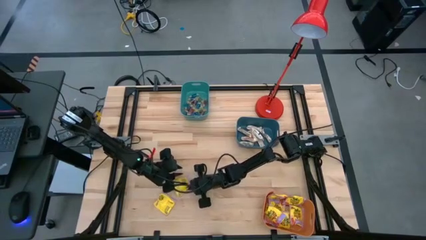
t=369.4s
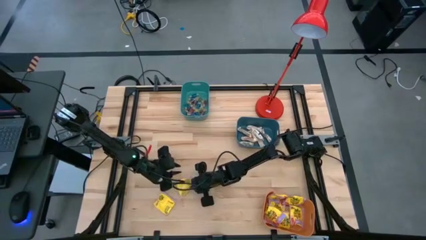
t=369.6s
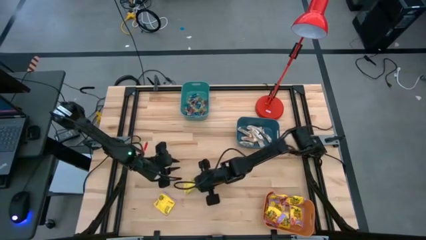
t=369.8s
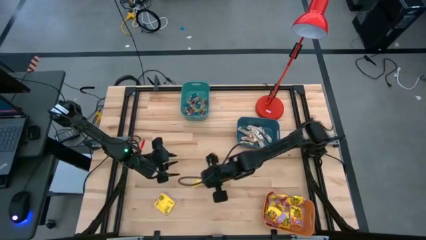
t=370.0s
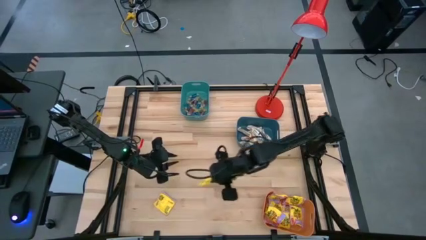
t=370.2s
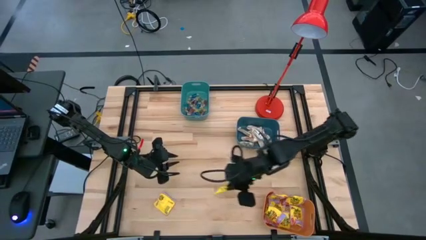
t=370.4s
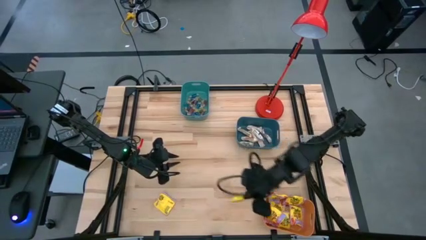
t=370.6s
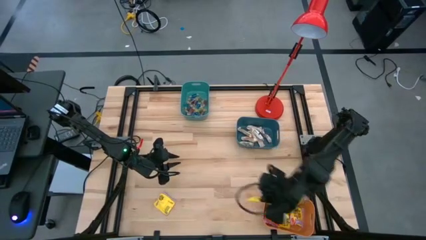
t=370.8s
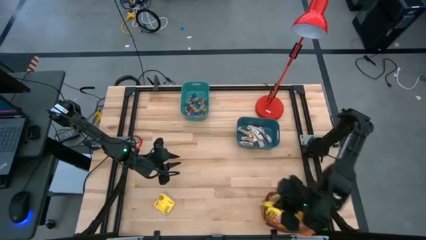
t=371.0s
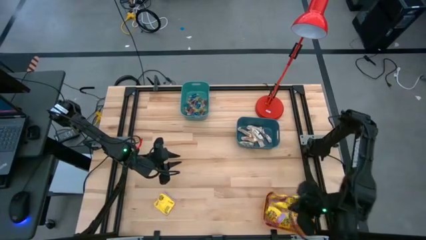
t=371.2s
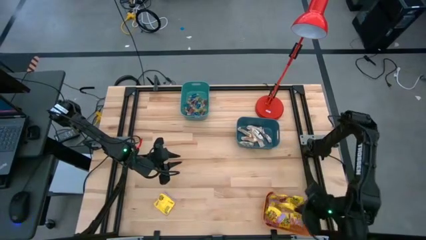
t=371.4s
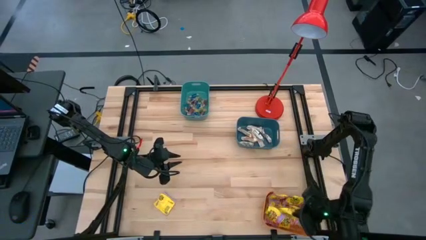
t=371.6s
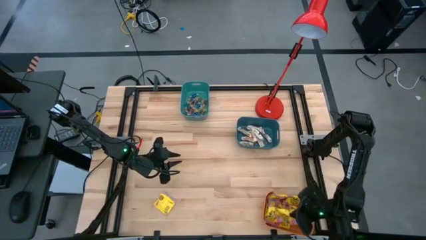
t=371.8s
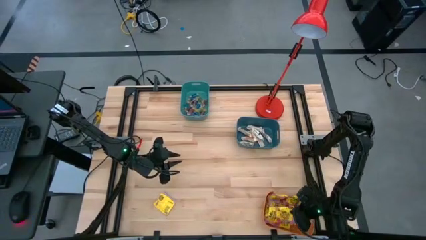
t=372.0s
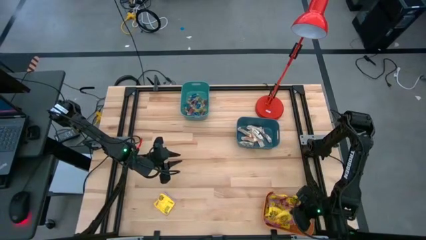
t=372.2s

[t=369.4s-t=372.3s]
Task: Sort candy
Put the yellow candy bag into the orange bin

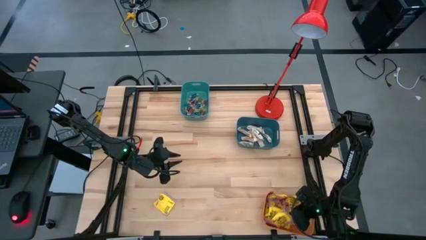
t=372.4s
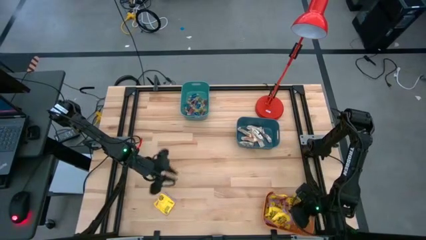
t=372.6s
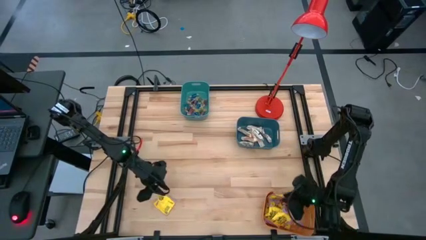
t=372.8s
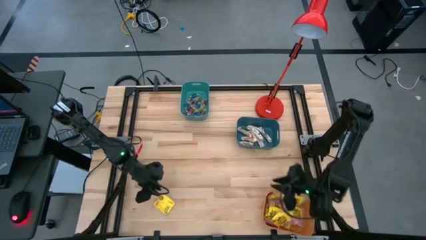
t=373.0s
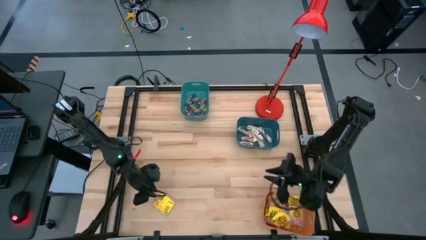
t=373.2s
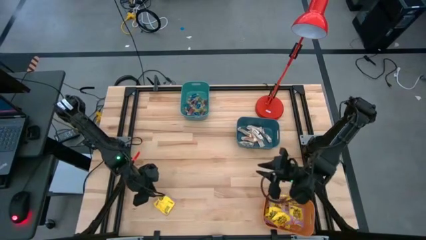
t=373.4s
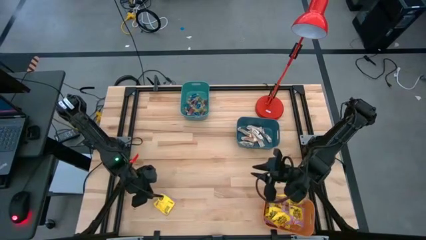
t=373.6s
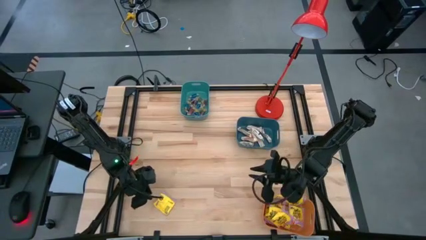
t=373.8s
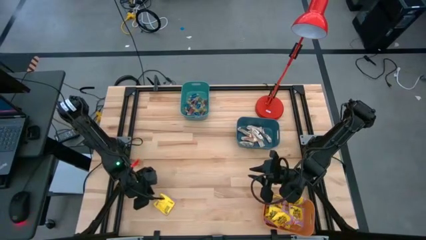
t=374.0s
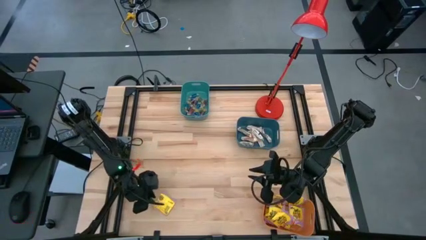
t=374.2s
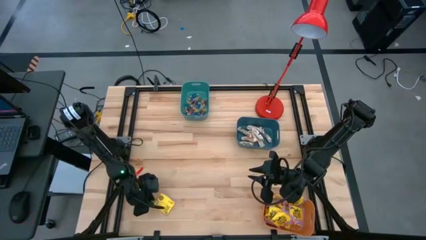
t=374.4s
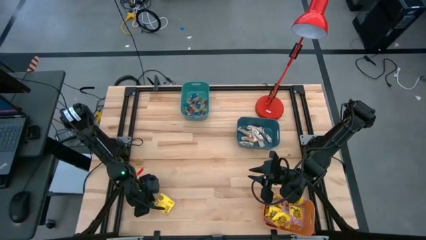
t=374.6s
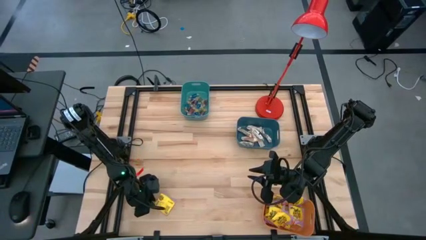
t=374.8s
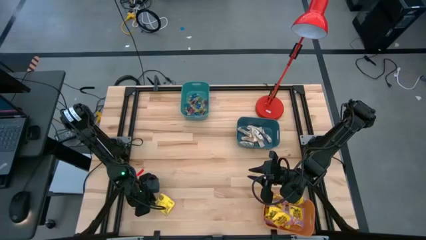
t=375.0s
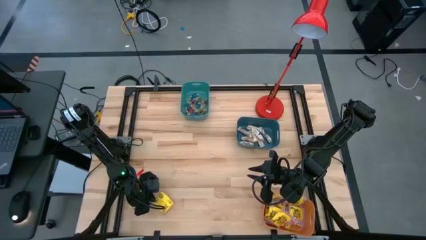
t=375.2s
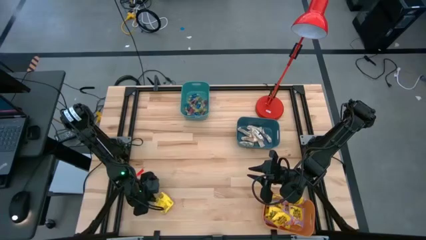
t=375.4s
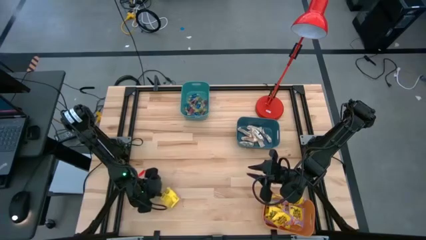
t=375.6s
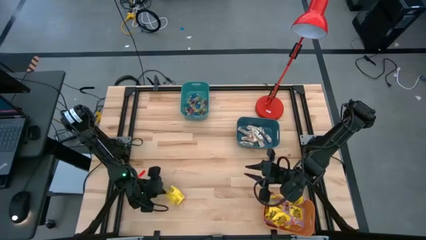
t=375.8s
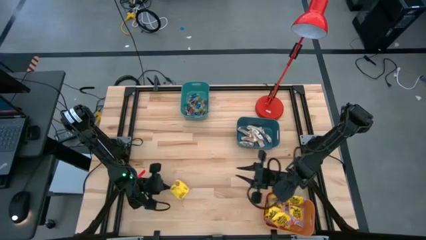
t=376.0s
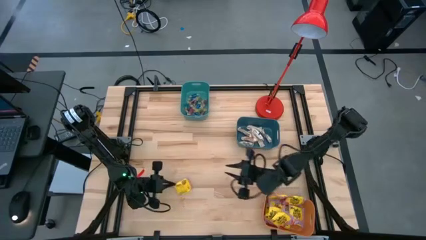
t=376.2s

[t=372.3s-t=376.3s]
Put the yellow candy bag into the orange bin

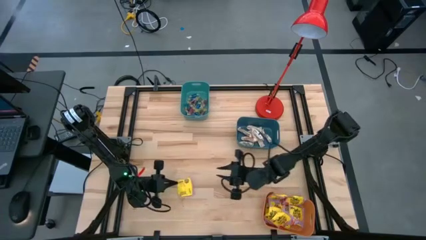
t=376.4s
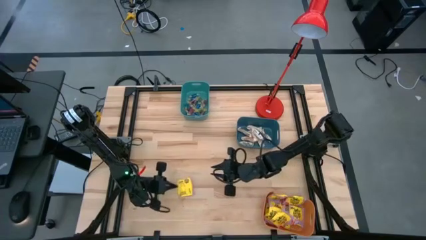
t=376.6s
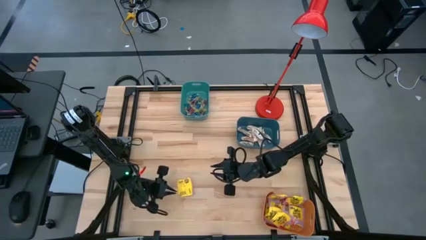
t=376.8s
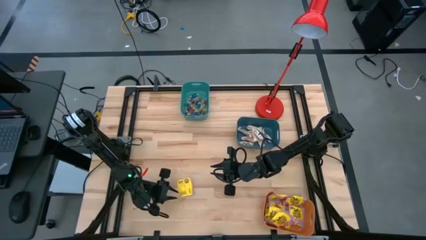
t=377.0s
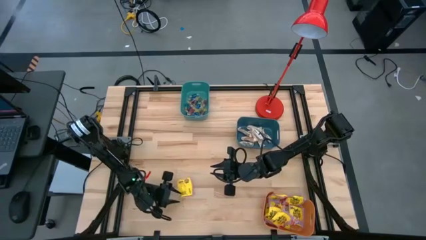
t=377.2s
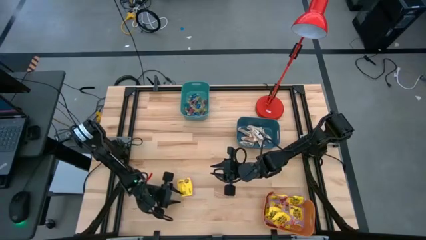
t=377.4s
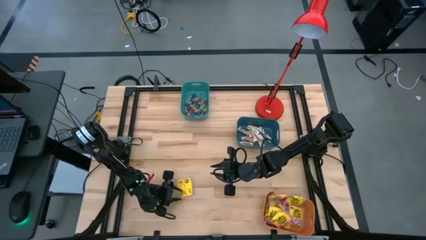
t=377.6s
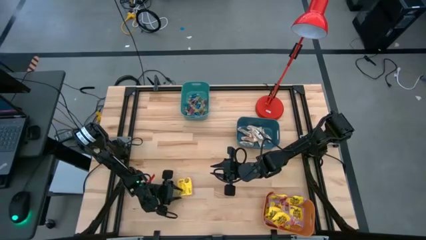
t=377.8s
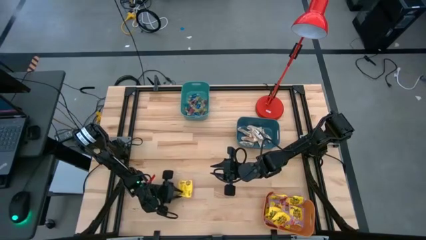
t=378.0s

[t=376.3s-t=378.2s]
Put the yellow candy bag into the orange bin

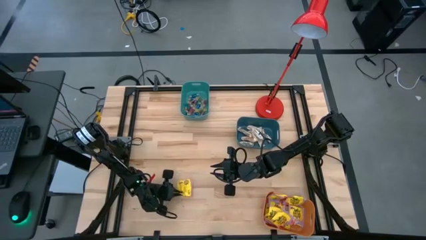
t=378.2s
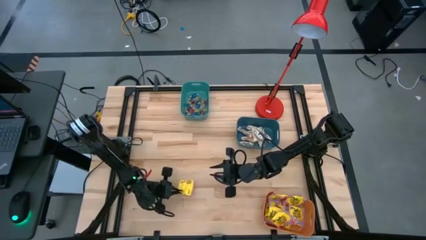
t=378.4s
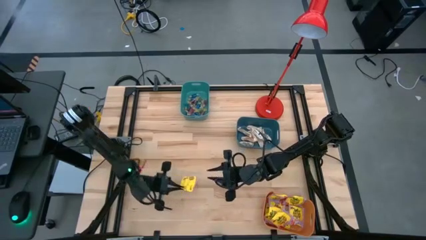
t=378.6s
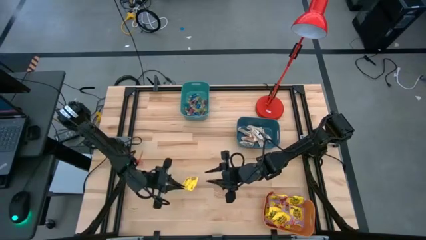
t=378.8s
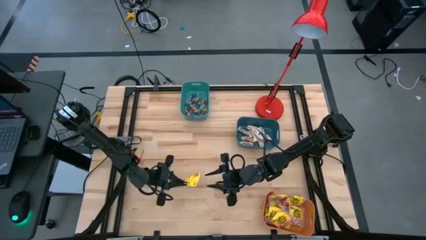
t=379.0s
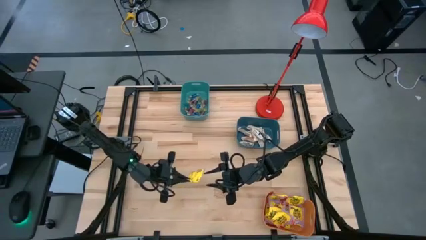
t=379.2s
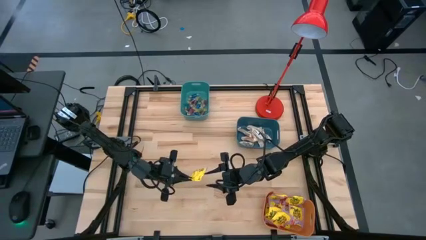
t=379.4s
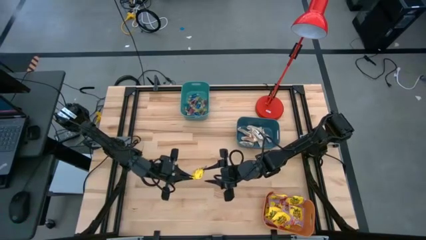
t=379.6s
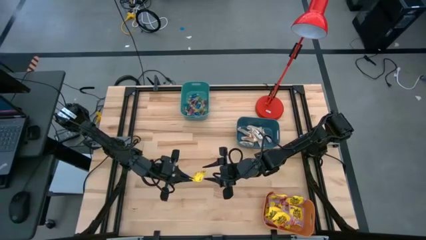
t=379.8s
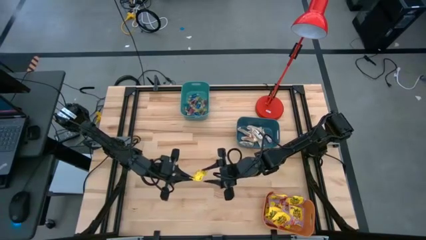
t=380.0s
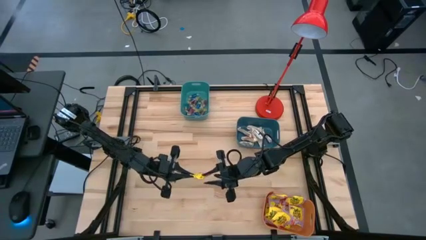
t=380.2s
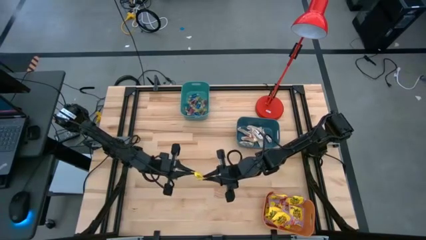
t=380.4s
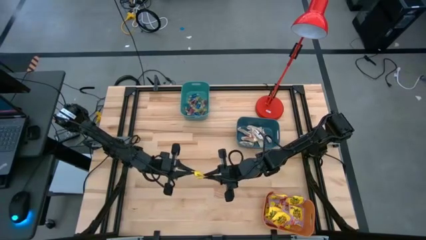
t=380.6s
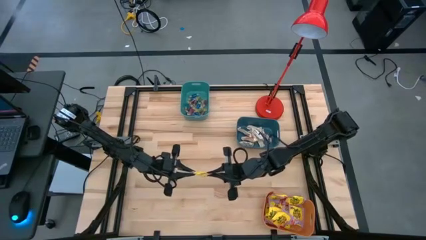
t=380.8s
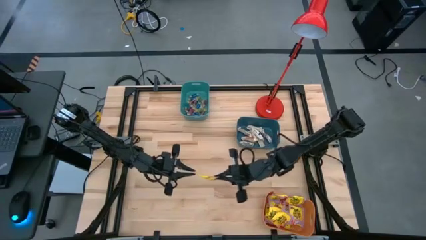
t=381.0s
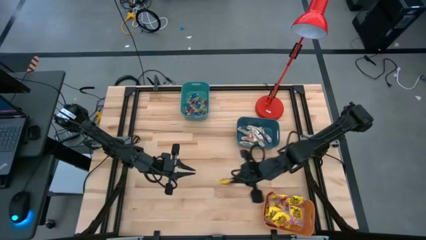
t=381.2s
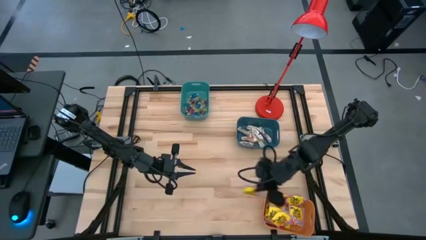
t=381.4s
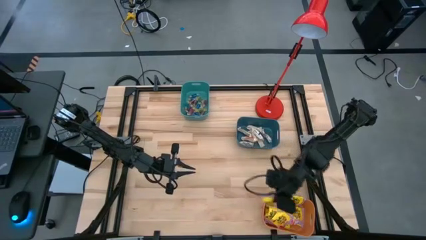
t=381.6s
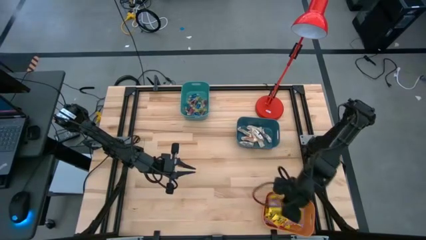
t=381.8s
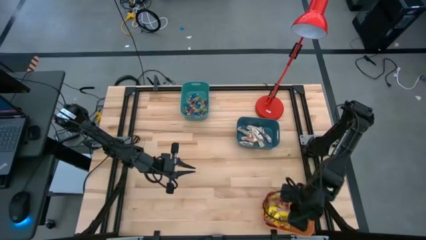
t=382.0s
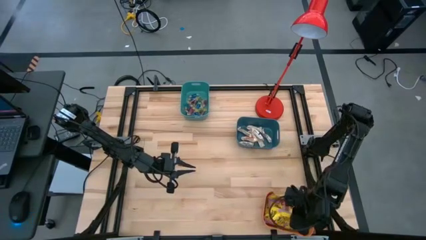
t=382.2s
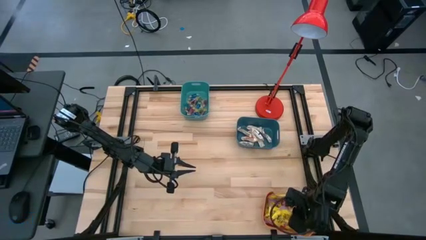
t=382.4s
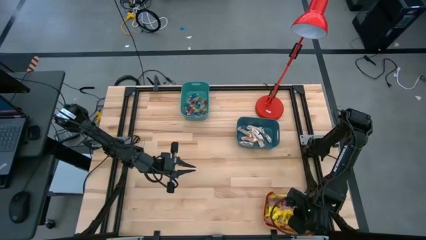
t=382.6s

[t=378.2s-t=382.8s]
Put the yellow candy bag into the orange bin
